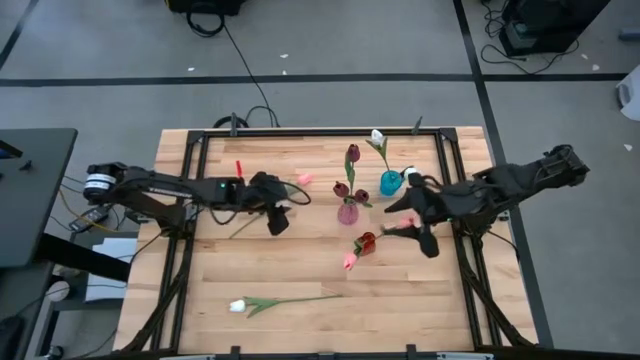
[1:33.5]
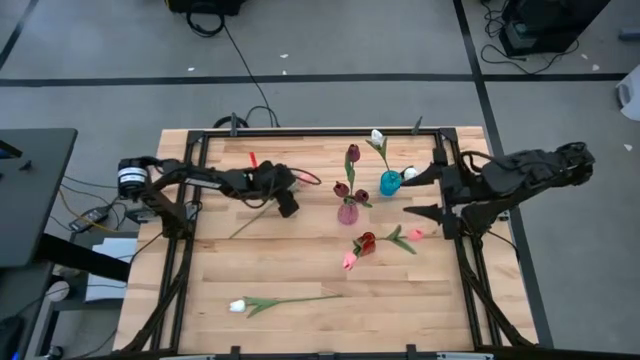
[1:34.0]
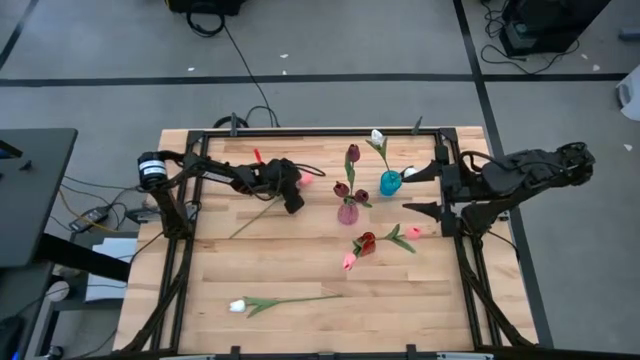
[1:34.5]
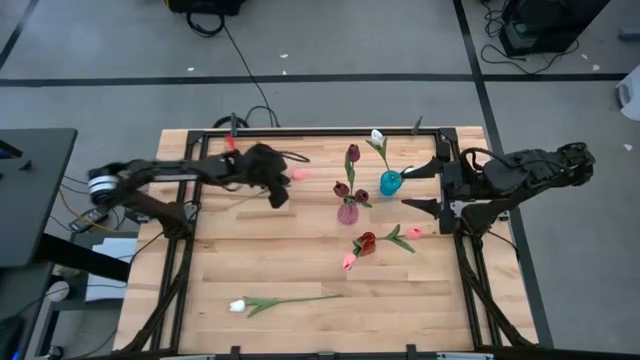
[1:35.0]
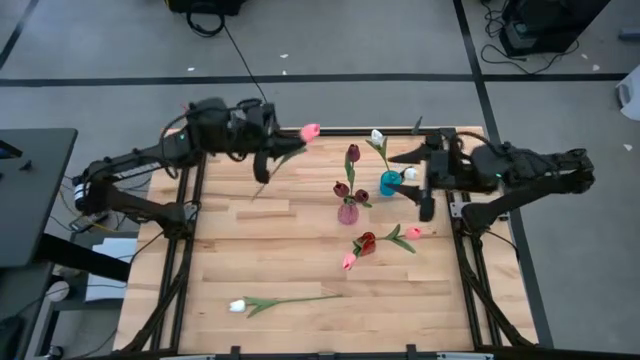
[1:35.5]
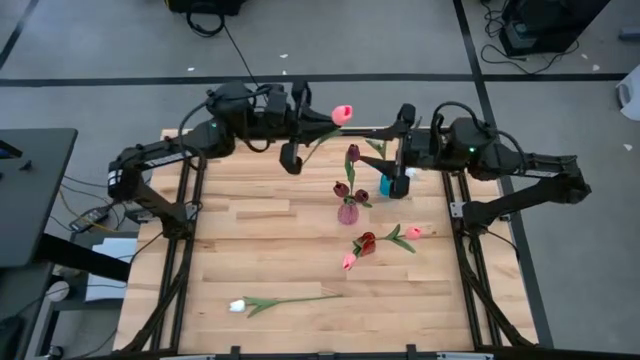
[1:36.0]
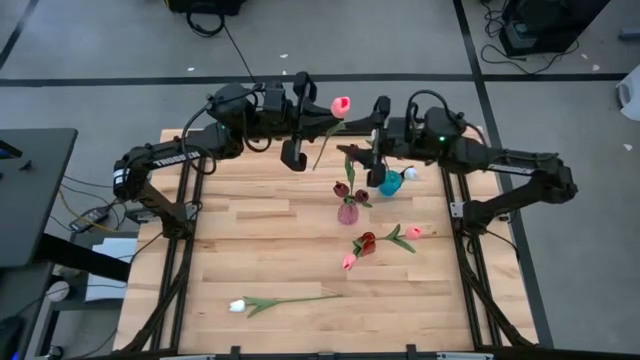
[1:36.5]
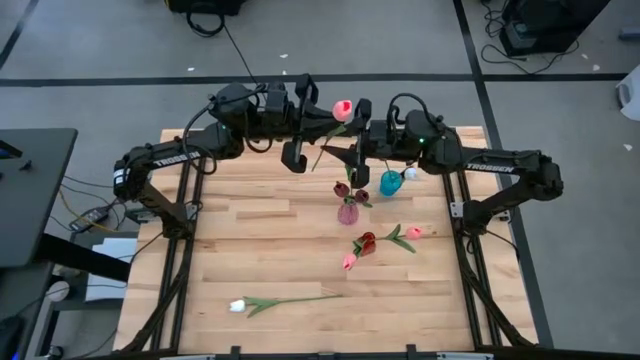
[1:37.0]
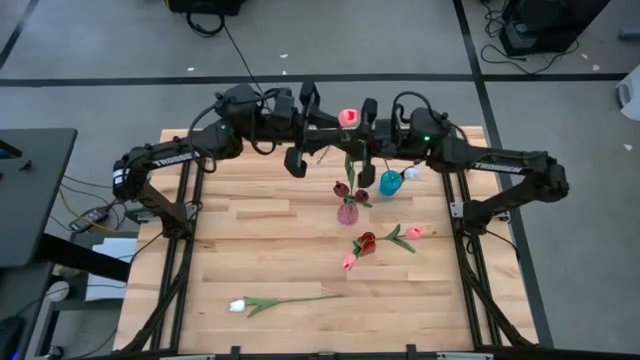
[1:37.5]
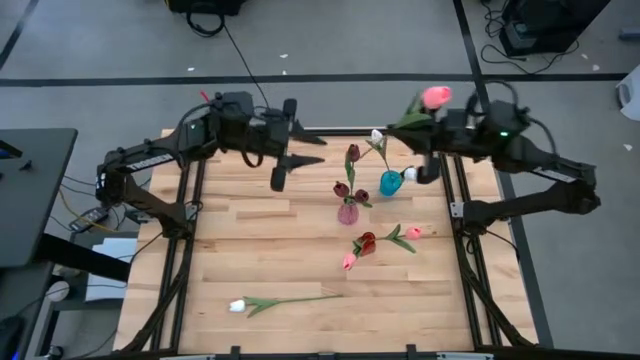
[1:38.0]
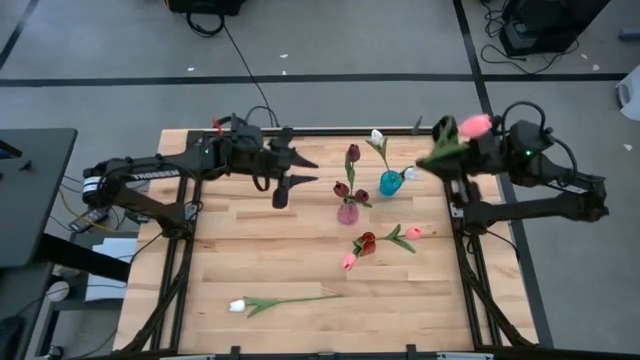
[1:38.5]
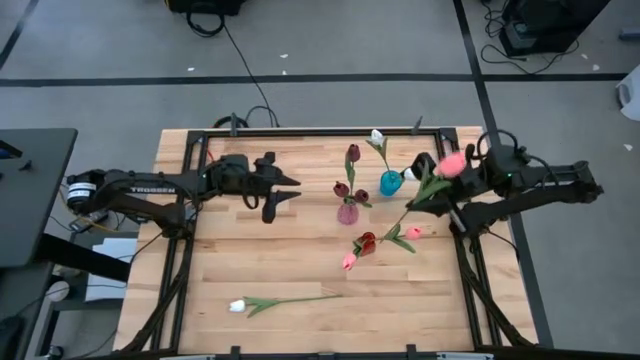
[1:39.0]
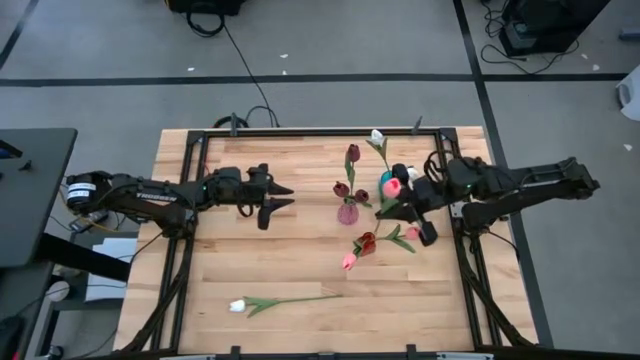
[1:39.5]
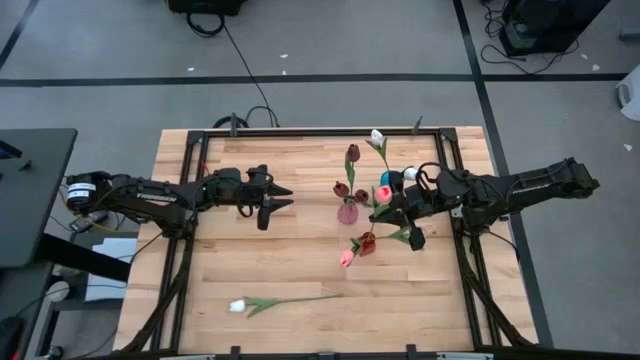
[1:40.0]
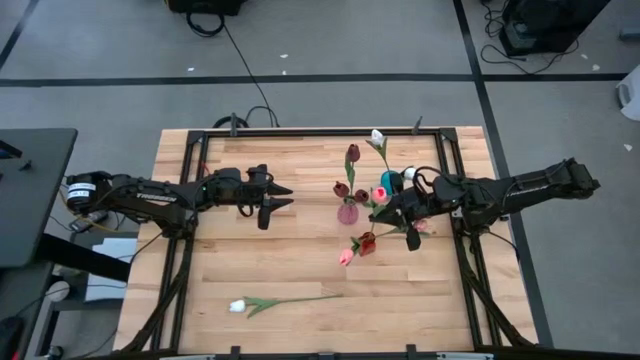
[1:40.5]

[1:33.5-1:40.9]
Task: Sort flowers into vase by color
Put the pink flower into the red vase

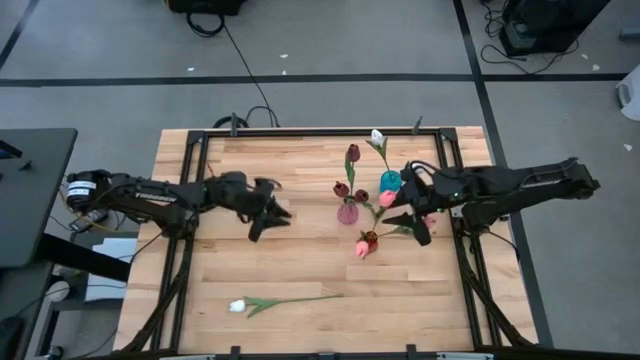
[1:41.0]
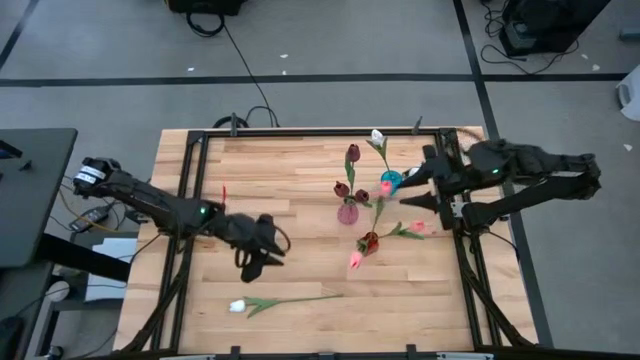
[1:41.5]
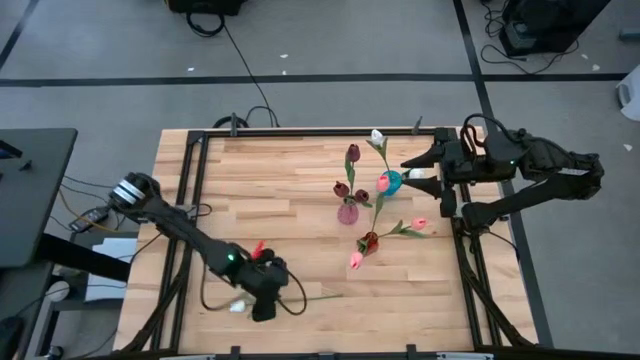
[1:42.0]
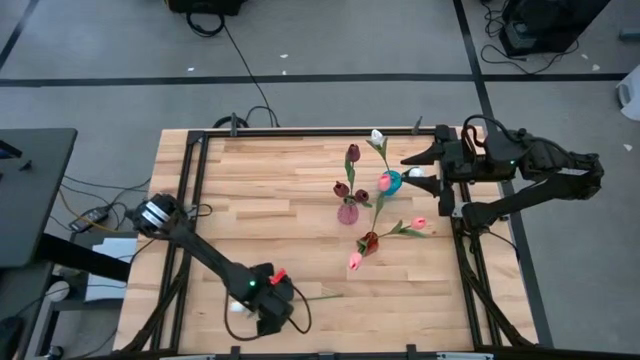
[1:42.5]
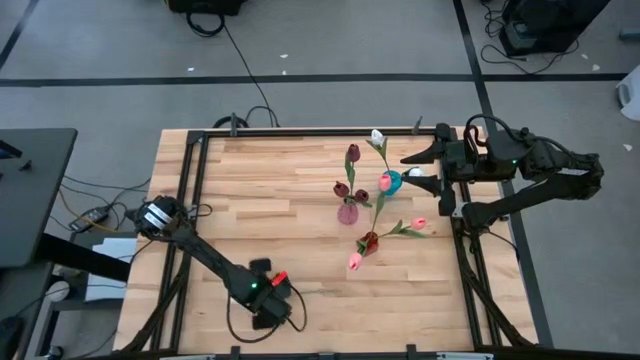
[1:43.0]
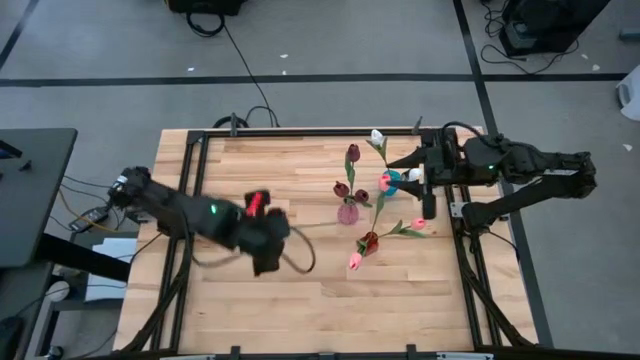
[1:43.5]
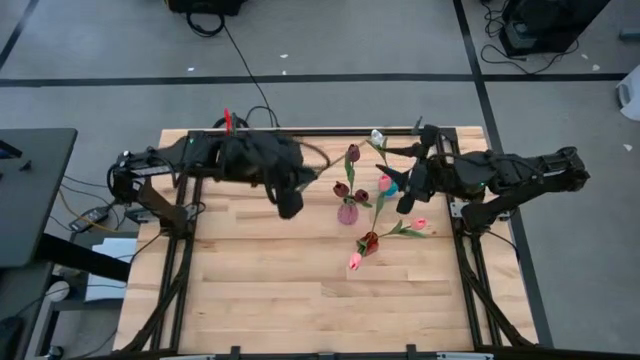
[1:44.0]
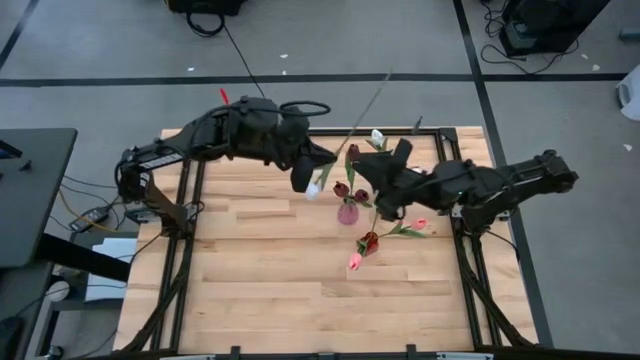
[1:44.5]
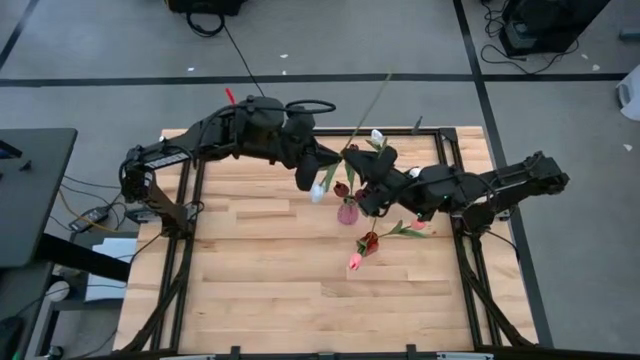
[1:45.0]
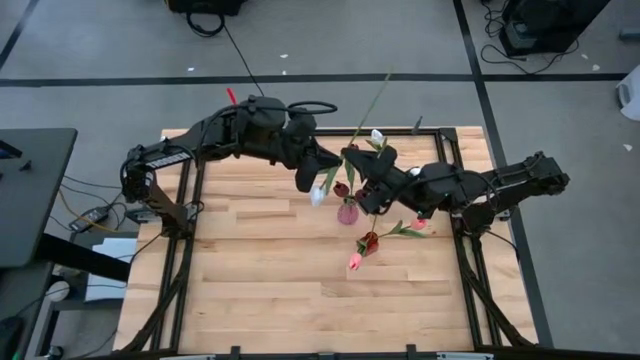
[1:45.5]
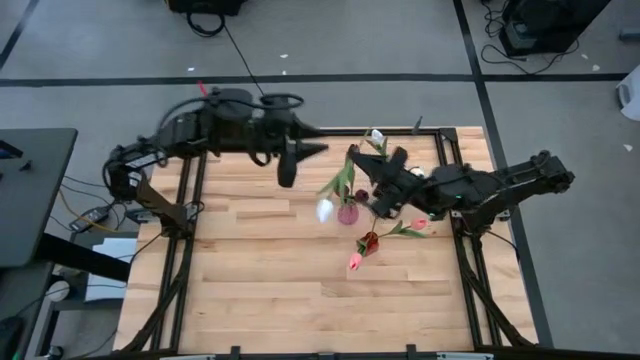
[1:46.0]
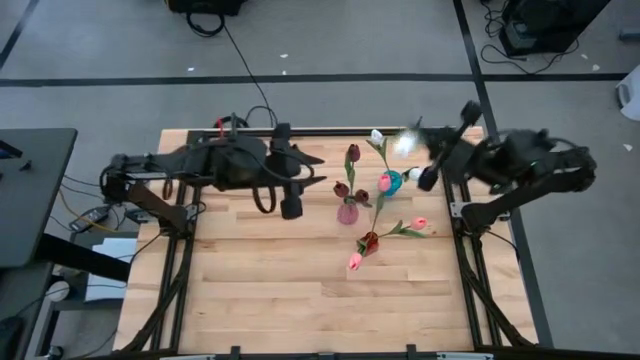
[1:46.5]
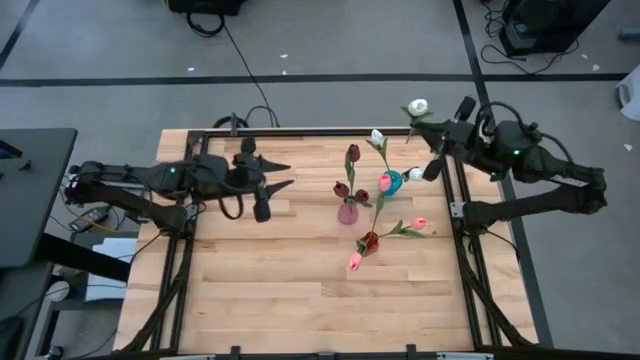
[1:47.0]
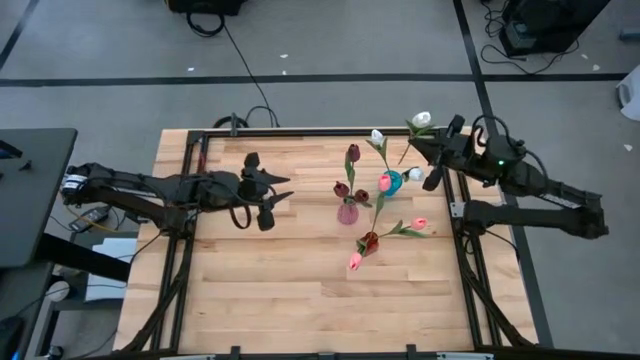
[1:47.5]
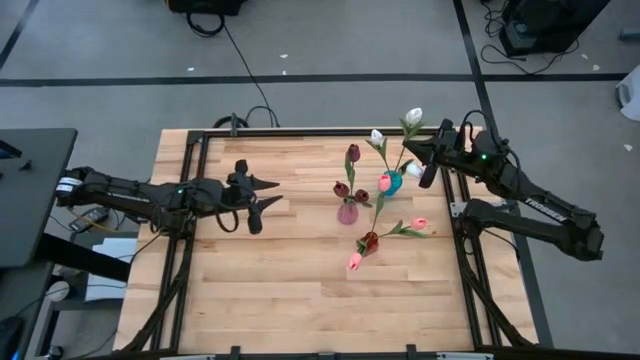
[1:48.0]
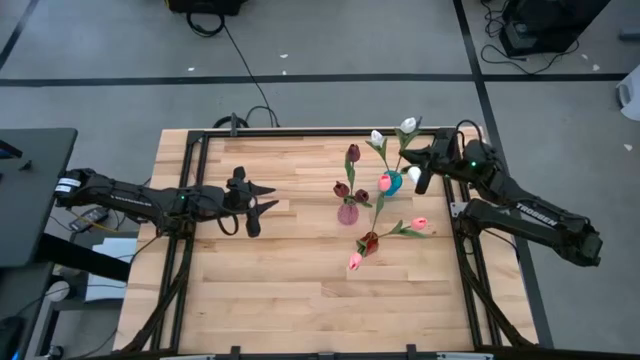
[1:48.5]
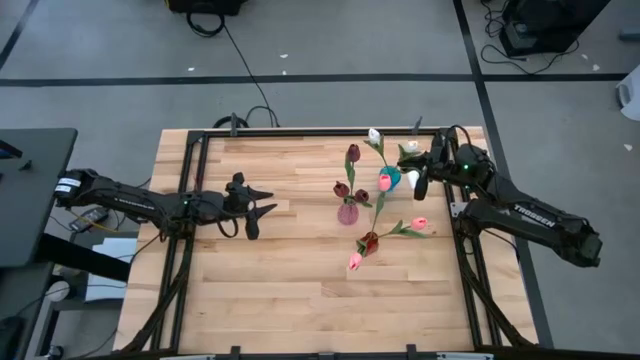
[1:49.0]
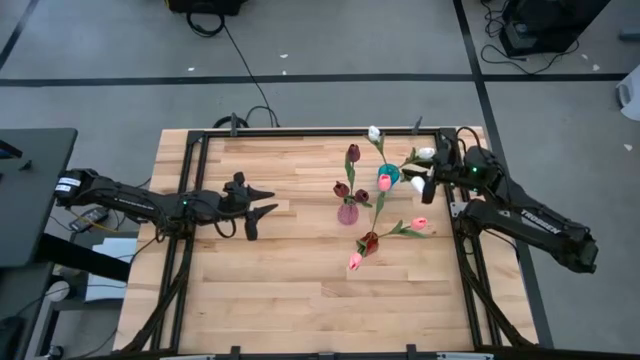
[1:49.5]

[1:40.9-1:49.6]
Put the white flowers into the blue vase

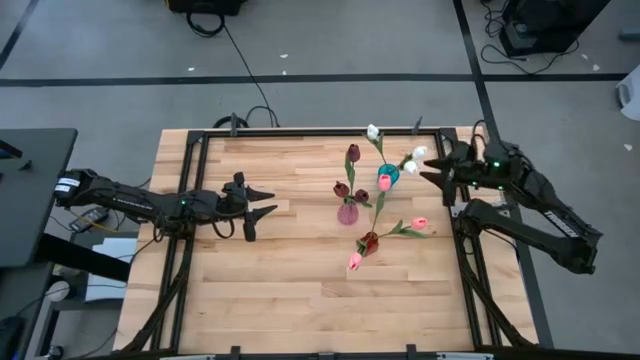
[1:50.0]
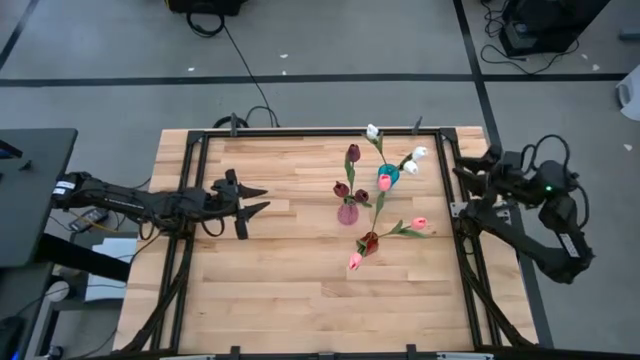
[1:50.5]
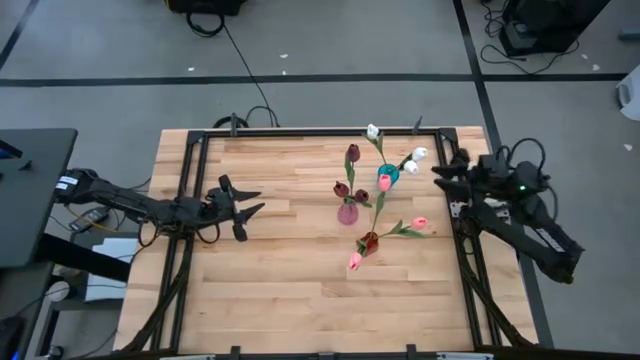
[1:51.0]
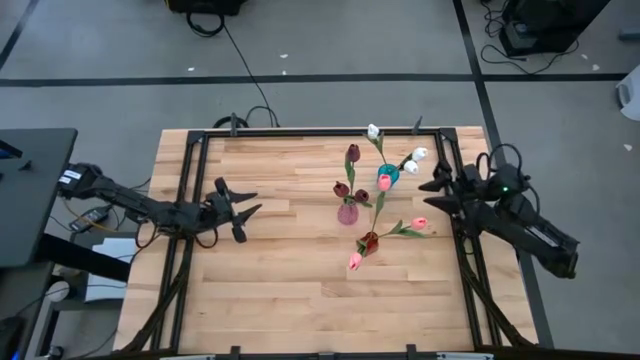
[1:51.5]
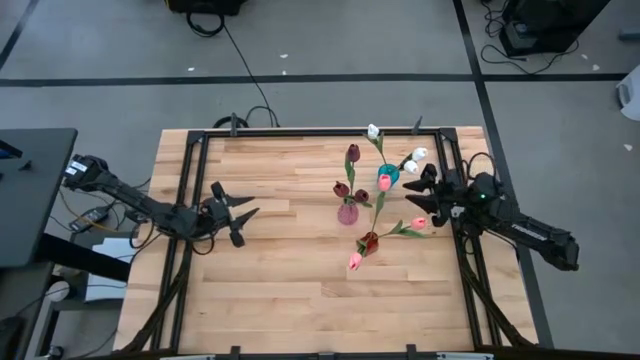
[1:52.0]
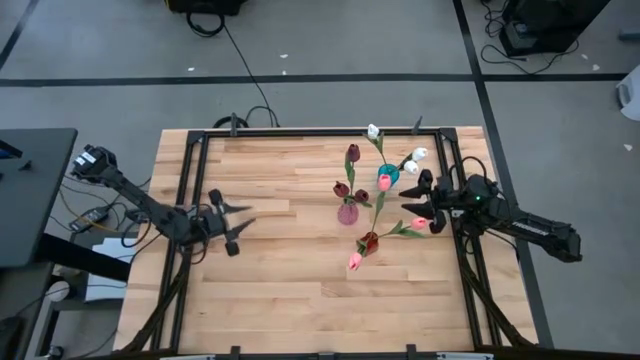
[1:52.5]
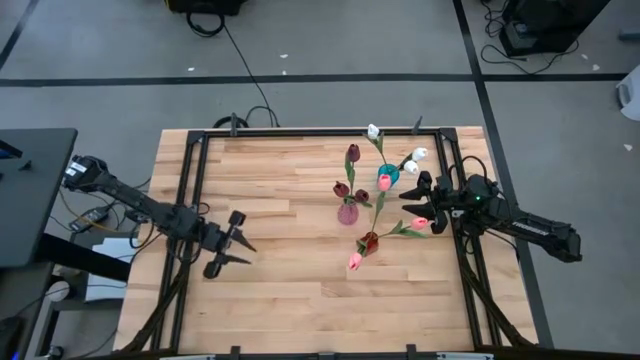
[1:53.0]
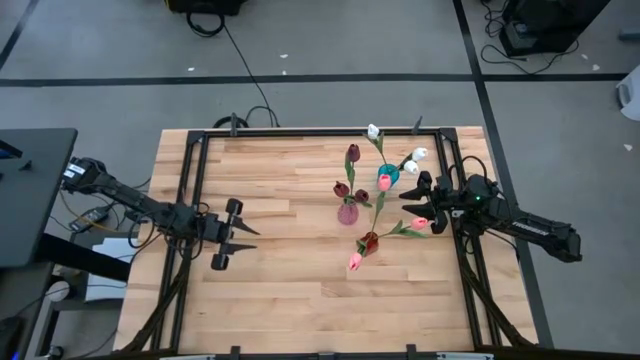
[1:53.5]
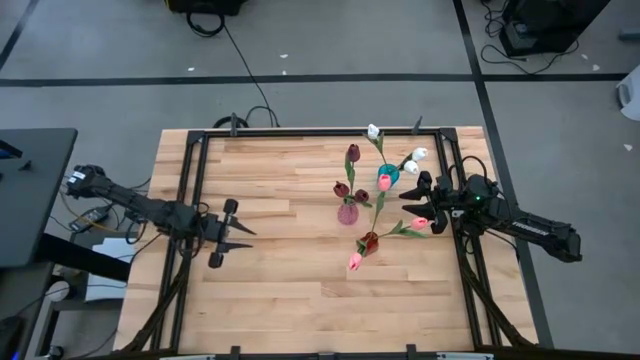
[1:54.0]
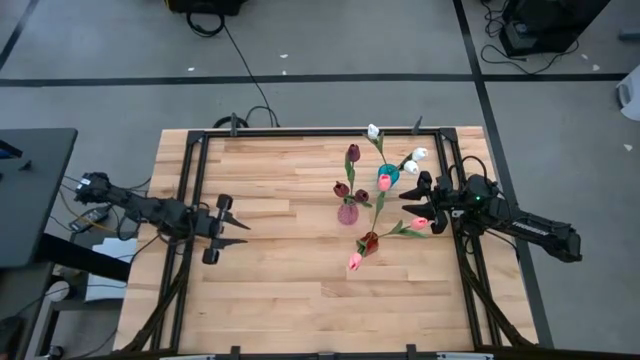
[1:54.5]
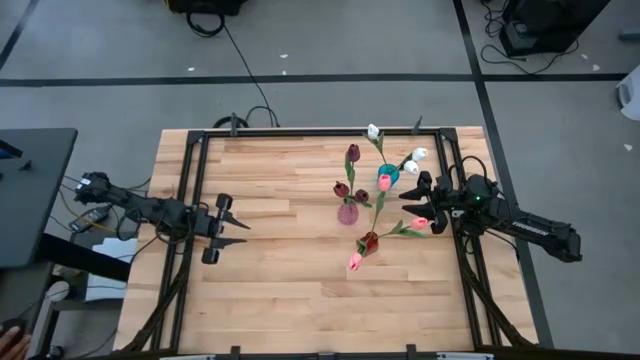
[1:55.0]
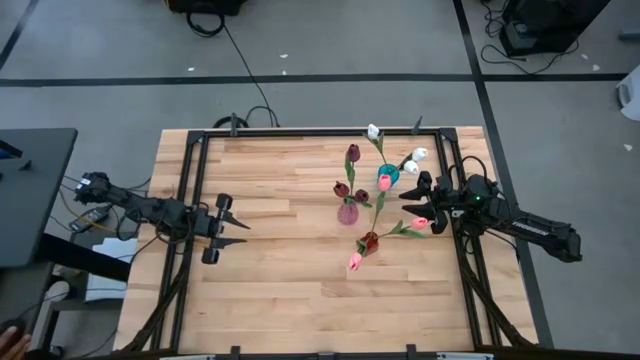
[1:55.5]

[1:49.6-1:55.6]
Return to Home Position

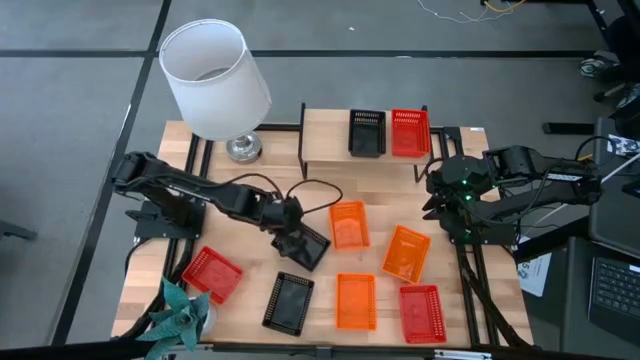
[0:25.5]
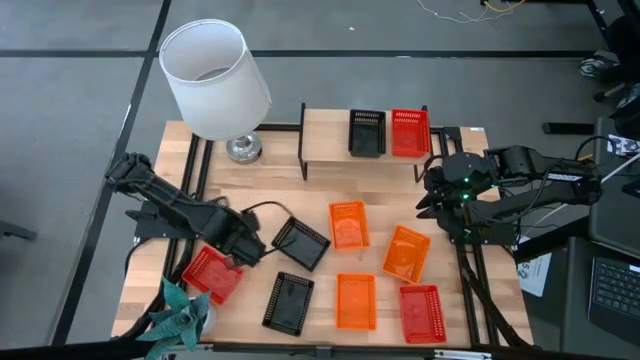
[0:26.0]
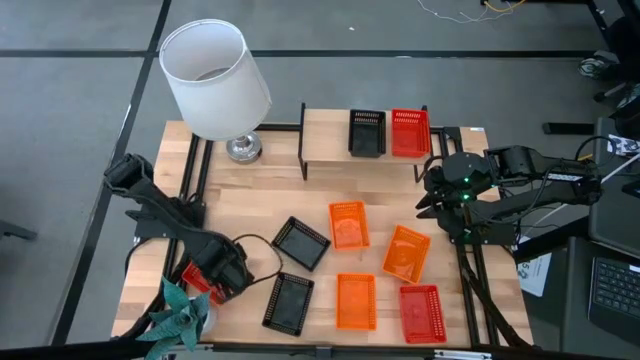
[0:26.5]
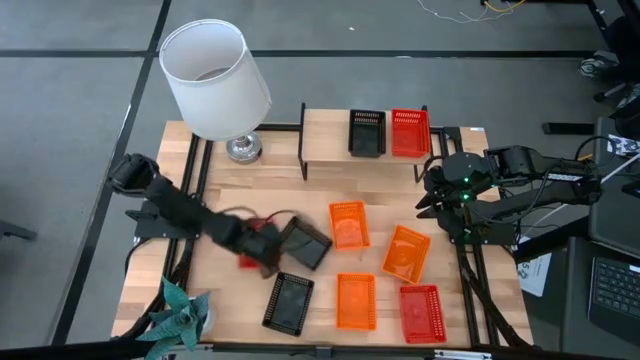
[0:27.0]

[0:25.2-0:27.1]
Task: Stack baskets on shelf by color
Adjust the red bin
